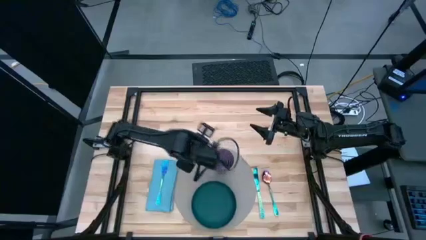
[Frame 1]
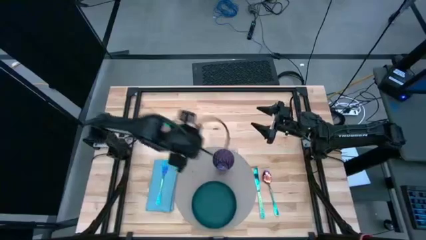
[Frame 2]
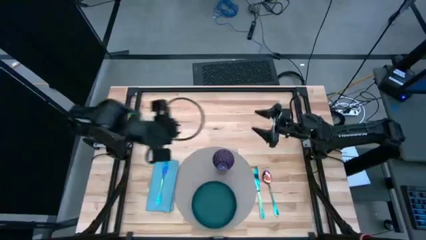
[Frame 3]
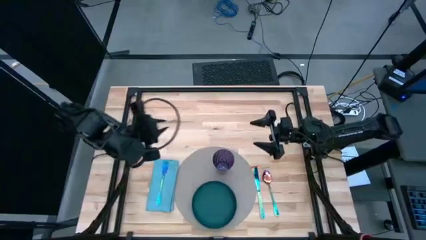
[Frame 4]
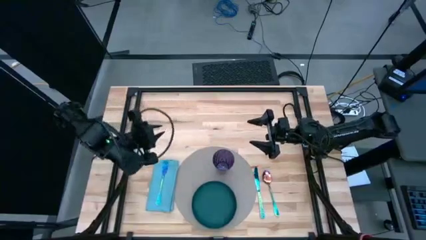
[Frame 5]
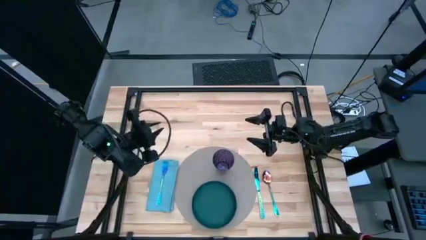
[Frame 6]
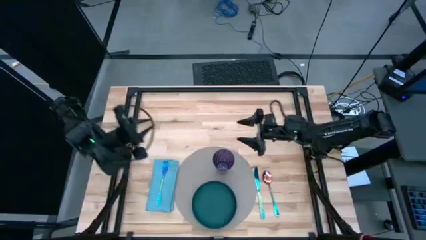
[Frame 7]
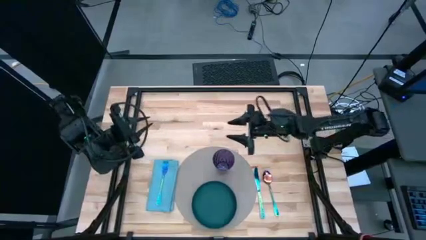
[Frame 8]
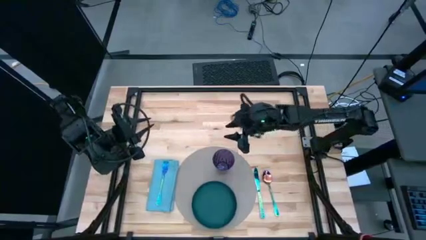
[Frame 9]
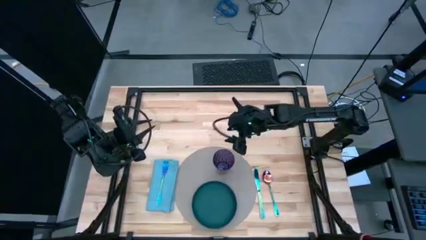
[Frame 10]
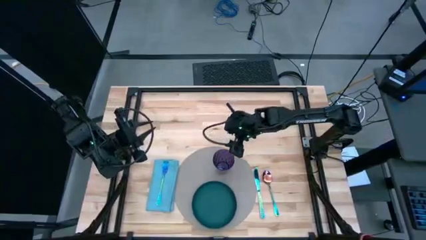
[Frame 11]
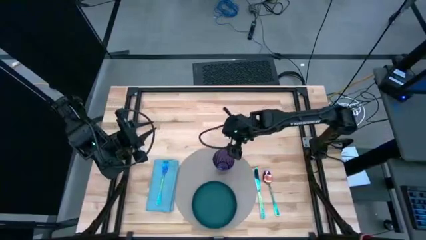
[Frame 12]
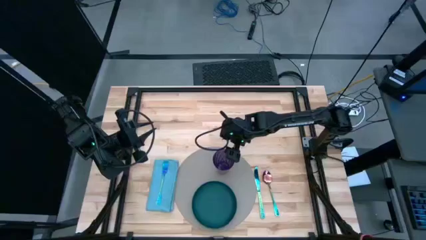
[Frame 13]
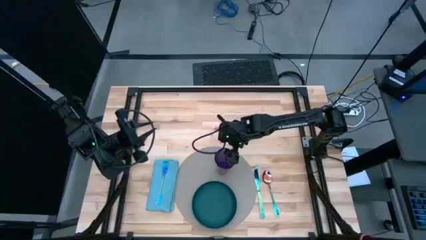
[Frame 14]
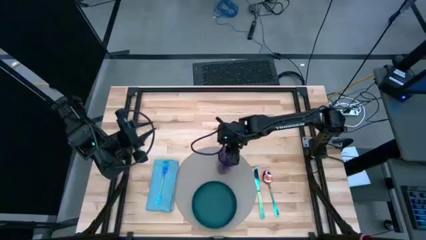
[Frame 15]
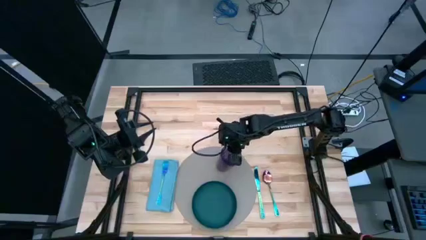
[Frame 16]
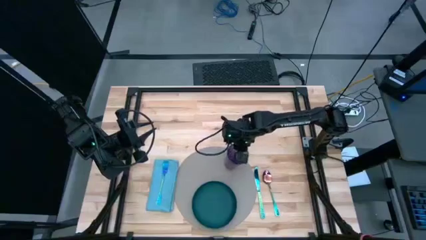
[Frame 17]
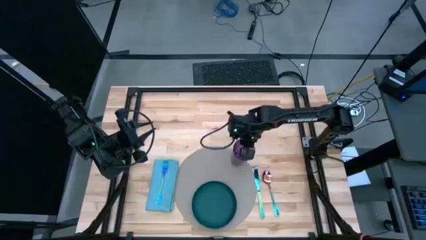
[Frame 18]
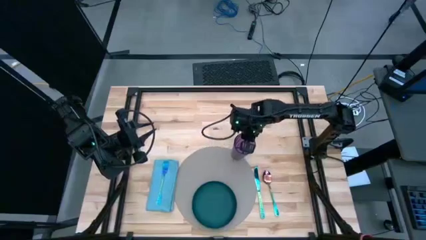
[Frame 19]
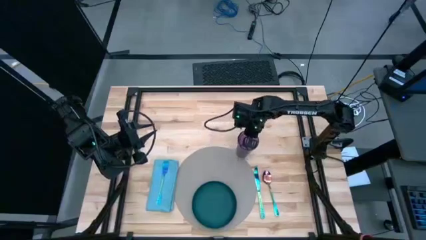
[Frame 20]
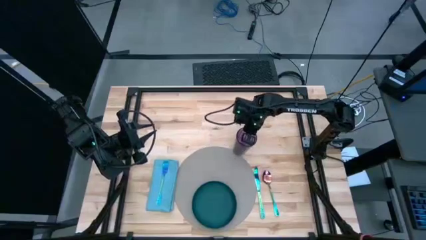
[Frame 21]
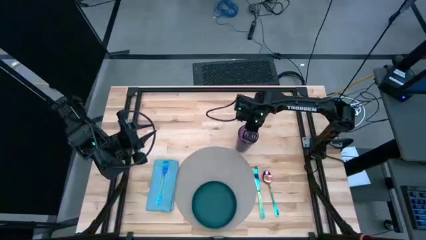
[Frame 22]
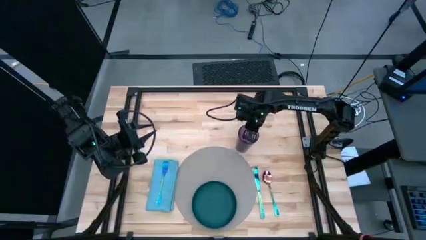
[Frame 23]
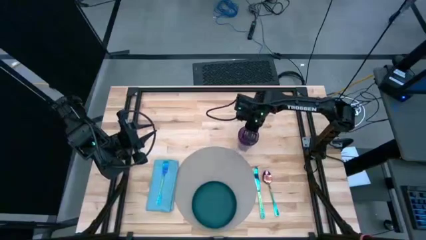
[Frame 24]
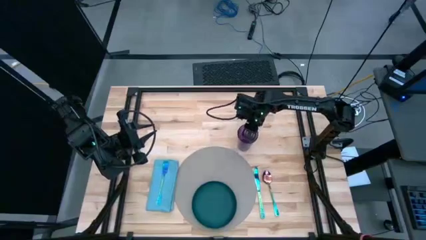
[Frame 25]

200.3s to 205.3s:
Task: Set table place
Move the purple glass to the top right of the gray placemat

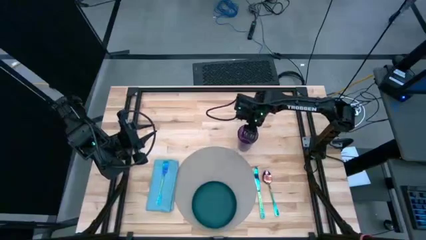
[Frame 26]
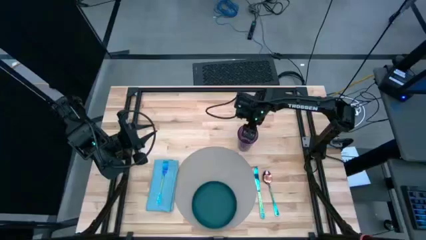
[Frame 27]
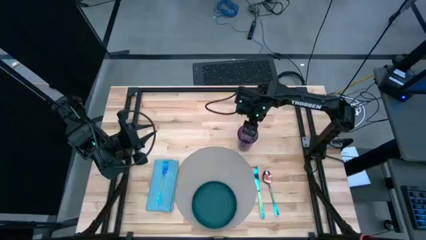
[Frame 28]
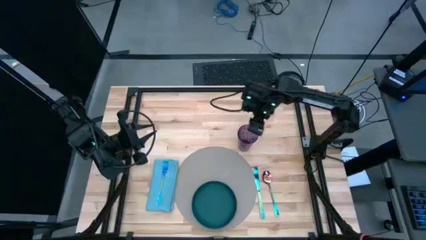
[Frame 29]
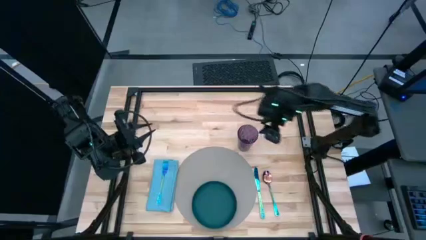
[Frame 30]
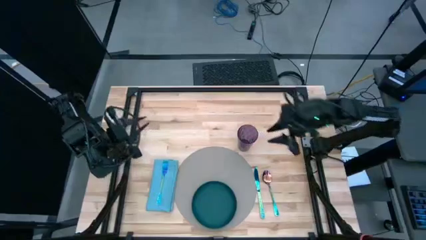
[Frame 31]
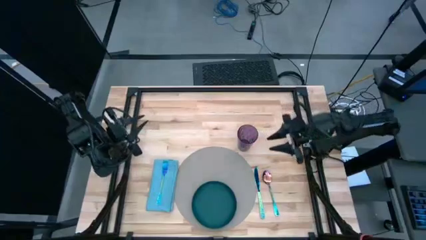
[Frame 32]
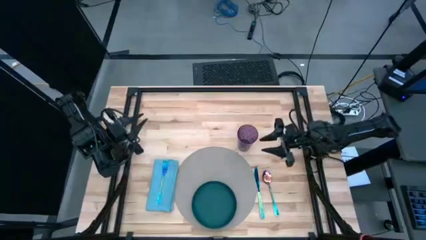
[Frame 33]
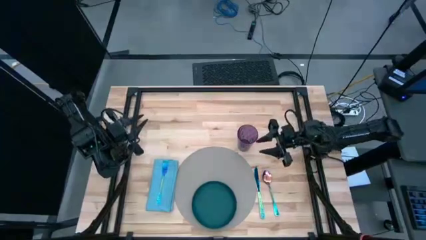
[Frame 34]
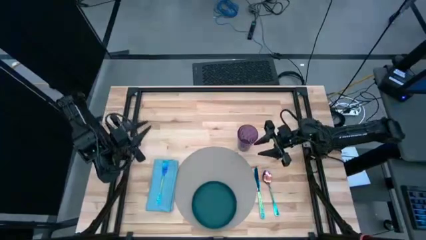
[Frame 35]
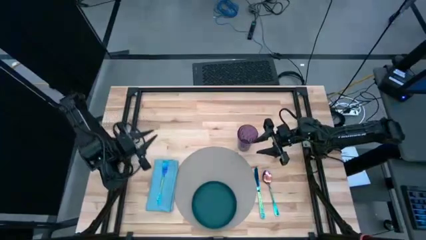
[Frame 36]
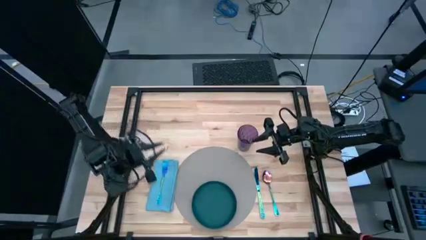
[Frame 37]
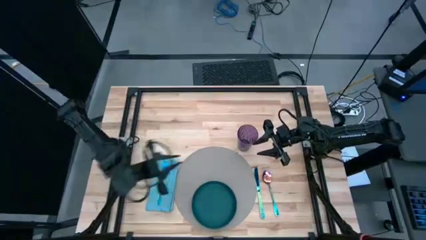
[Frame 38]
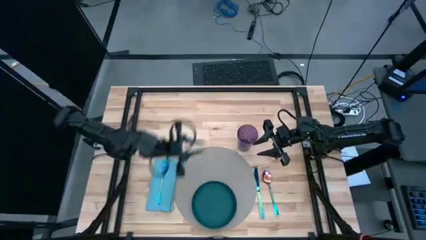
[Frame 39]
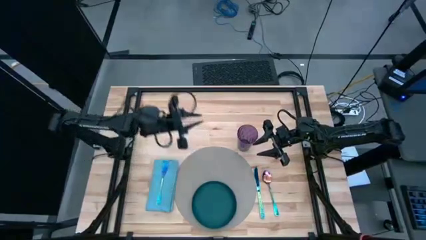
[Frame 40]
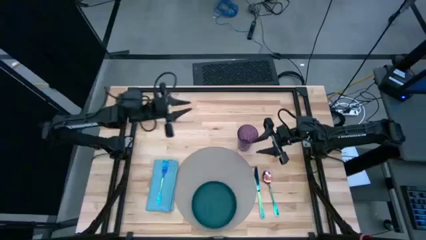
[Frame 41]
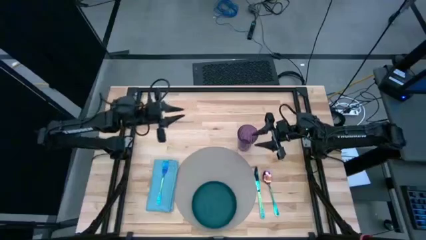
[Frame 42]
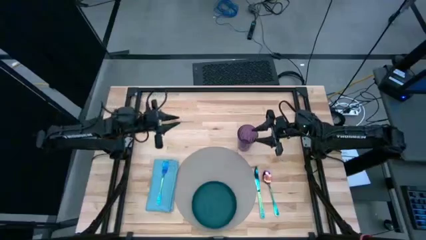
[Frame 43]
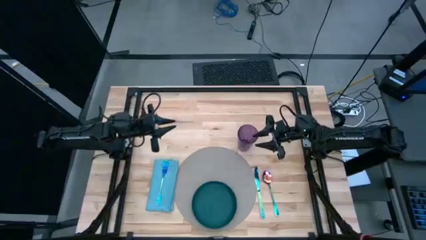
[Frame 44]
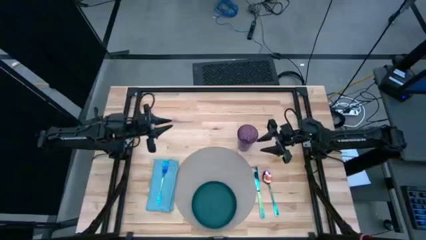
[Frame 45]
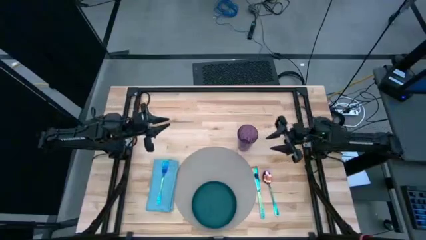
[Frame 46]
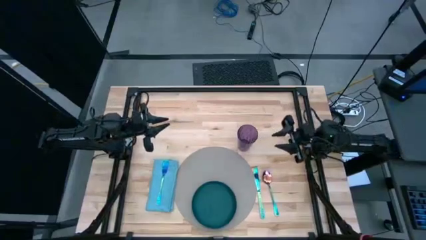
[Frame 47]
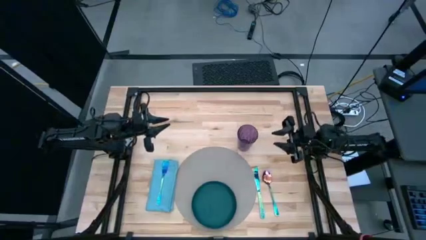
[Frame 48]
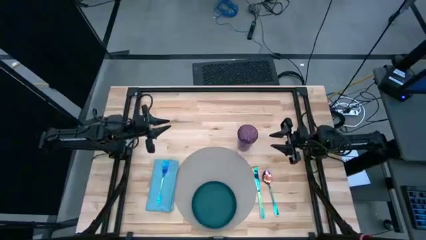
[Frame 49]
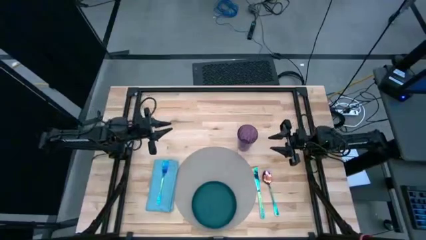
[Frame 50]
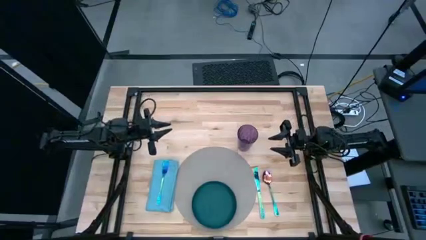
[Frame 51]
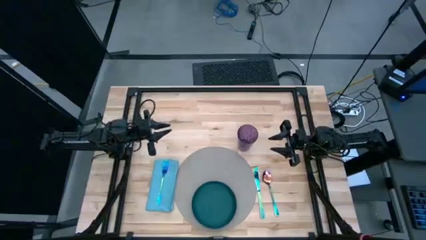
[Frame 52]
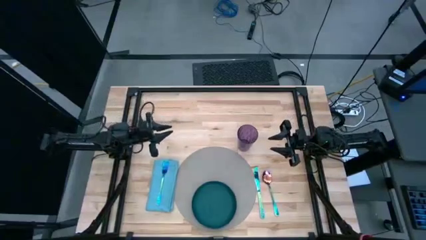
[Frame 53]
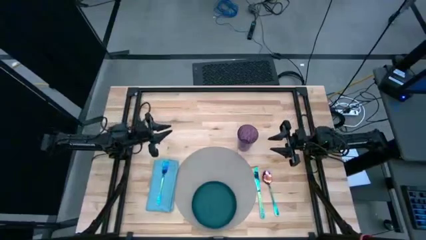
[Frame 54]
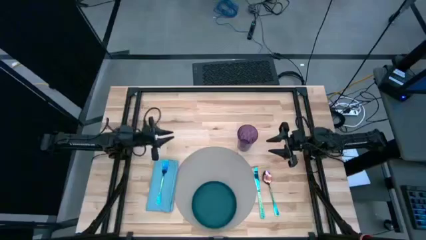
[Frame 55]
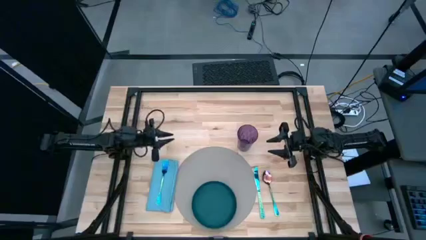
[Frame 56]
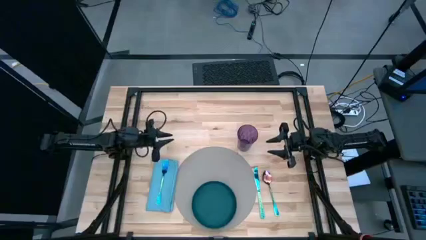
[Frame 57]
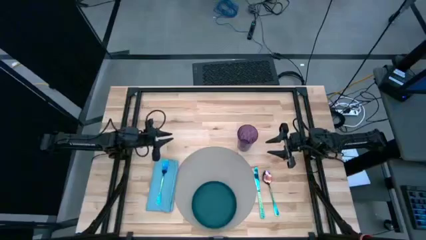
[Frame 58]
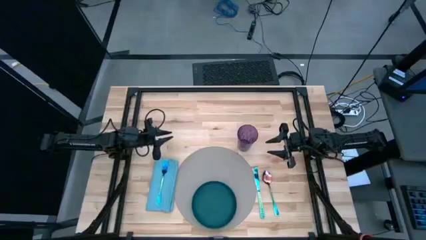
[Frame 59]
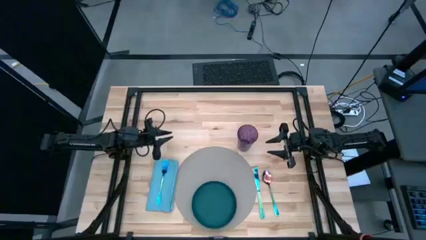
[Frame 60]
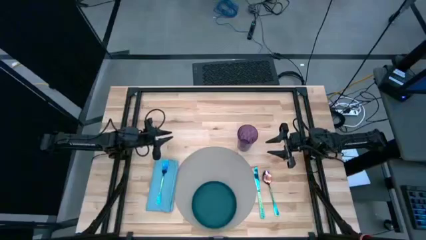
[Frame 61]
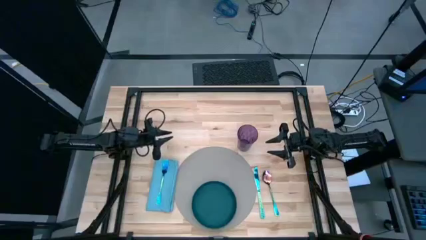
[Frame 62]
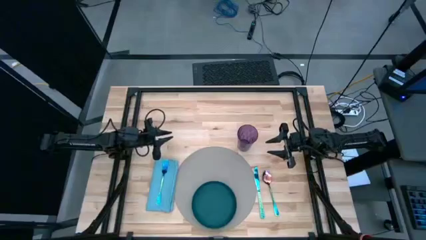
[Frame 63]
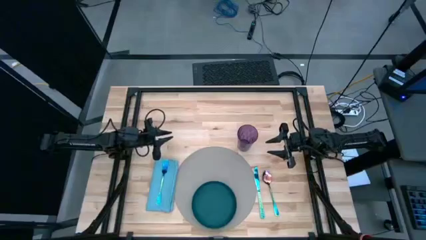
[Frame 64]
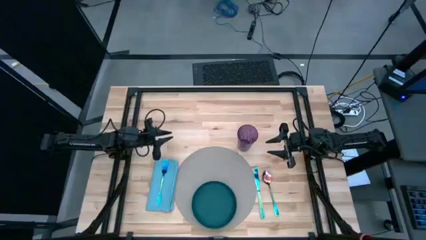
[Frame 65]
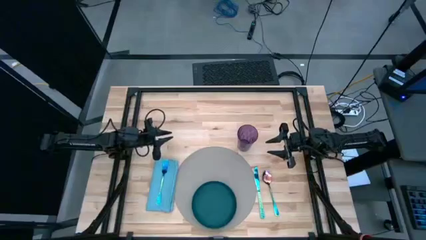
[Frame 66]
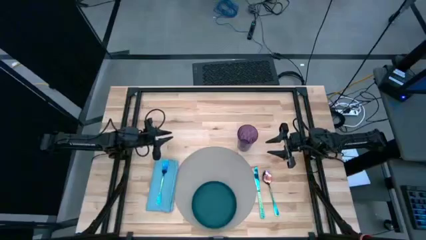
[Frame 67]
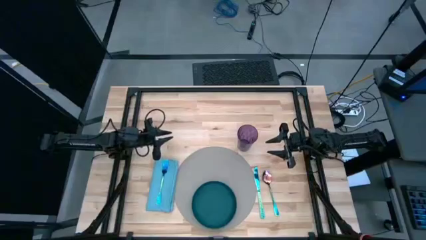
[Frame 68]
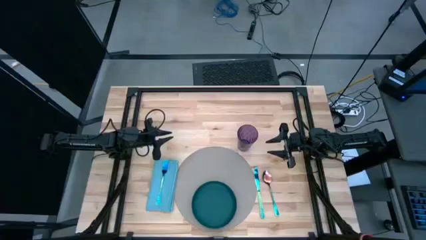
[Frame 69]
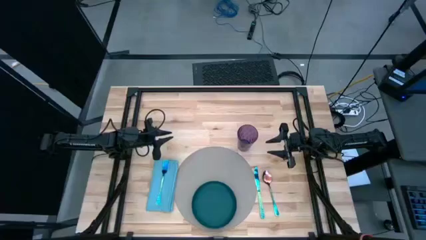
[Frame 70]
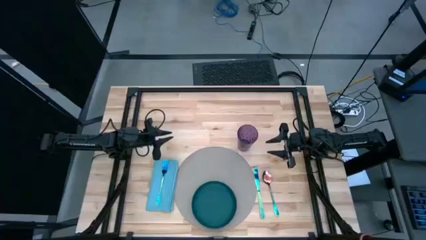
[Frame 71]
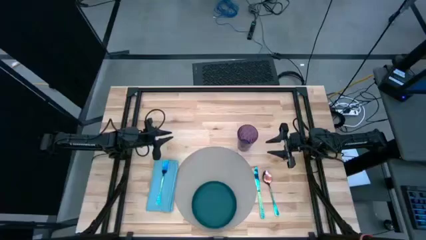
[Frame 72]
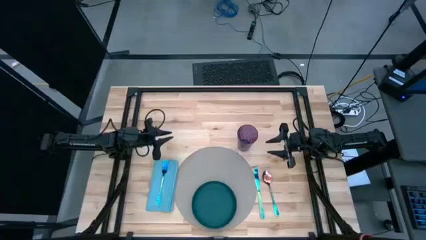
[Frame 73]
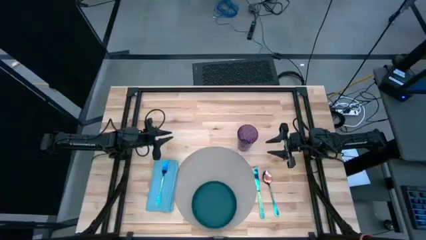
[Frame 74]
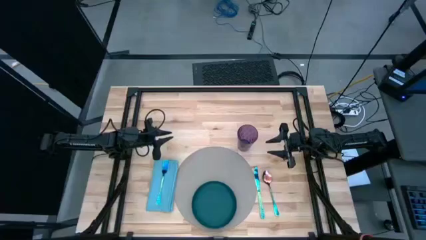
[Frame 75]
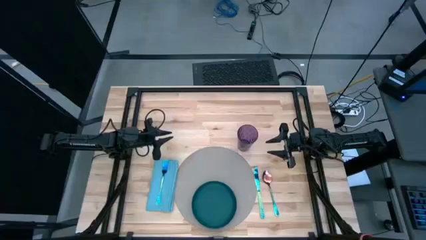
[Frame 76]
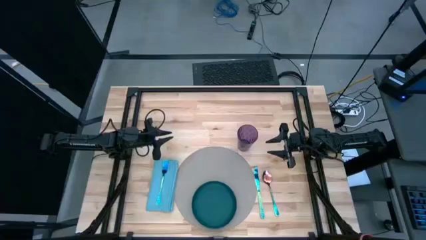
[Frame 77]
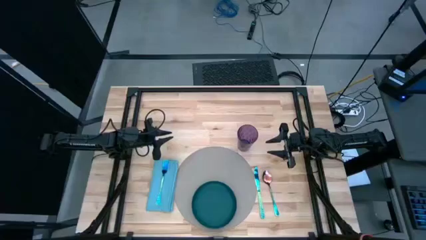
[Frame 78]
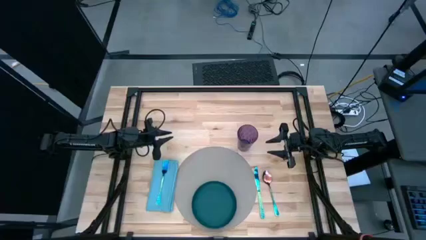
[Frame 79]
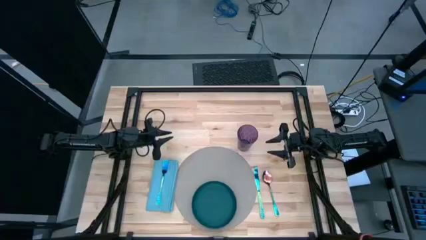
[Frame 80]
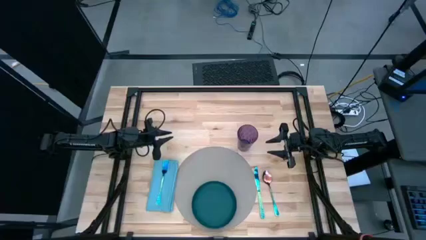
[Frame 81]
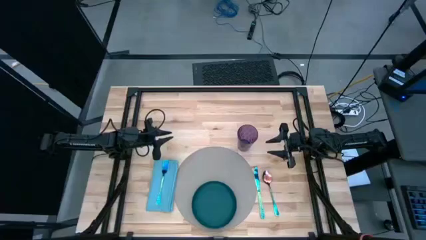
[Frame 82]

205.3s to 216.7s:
Return to Home Position

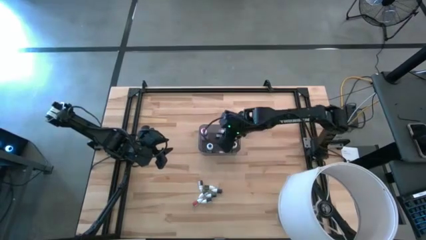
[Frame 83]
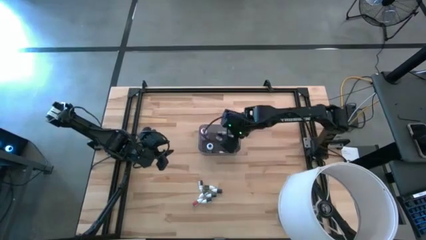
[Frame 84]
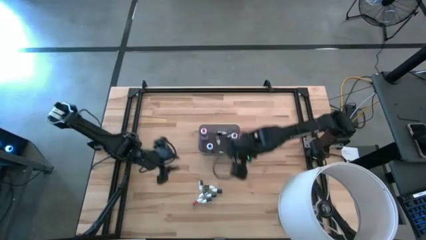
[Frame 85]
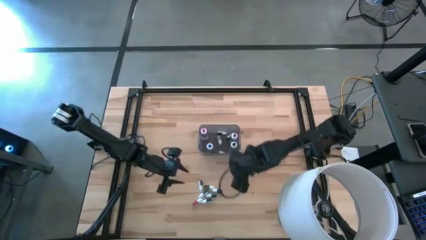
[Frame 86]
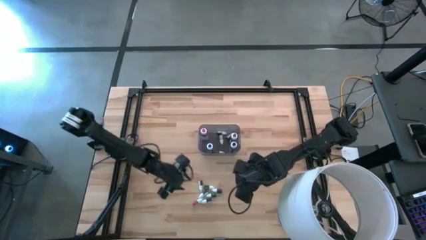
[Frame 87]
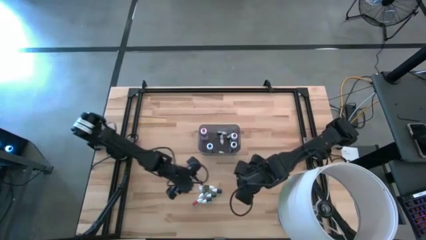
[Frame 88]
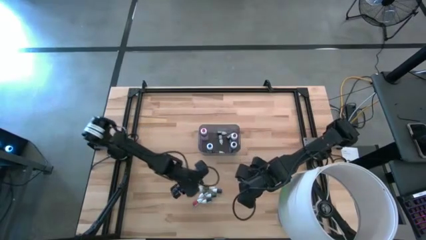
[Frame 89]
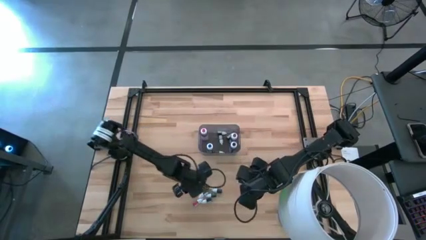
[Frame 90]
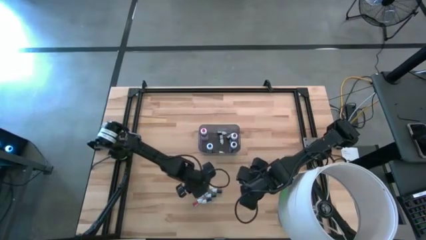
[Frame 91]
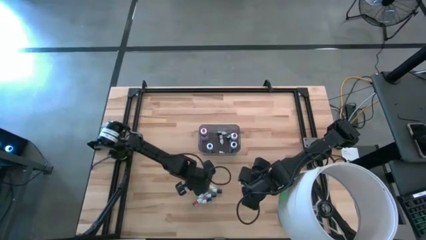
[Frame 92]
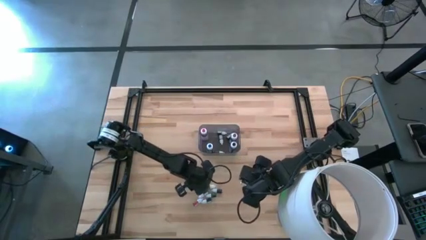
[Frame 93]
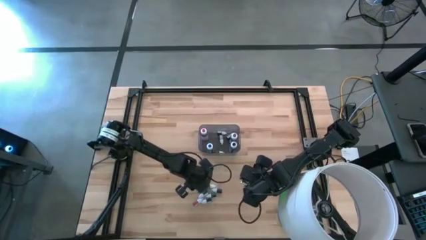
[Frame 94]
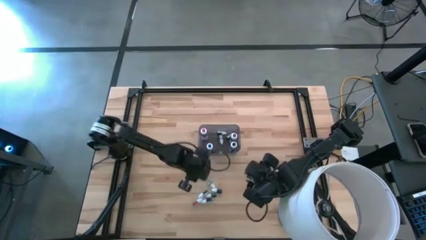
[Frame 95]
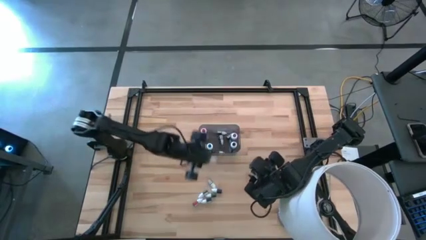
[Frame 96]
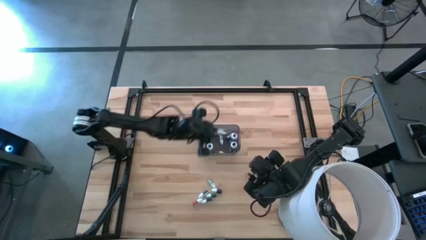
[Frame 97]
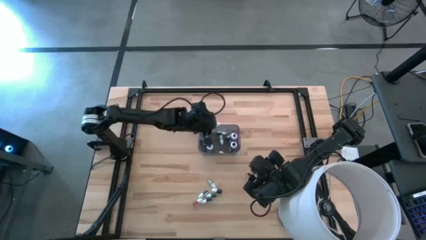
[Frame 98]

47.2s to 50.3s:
Task: Pick & Place food coloring
Put the top small black food coloring bottle in the black bin
